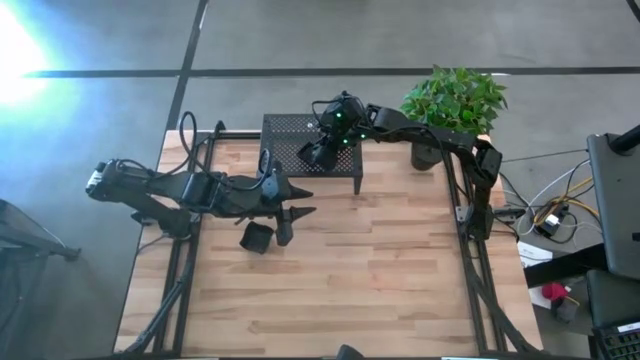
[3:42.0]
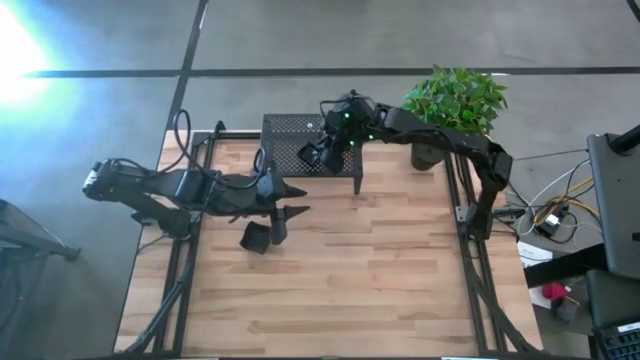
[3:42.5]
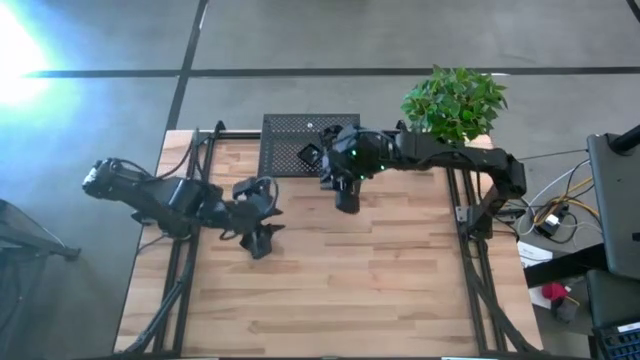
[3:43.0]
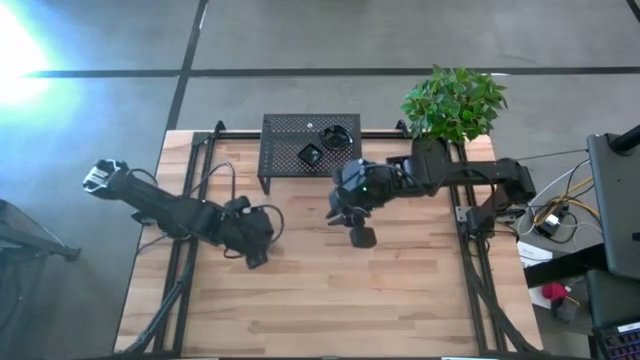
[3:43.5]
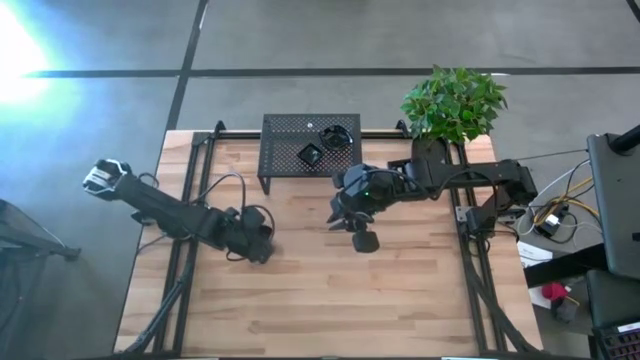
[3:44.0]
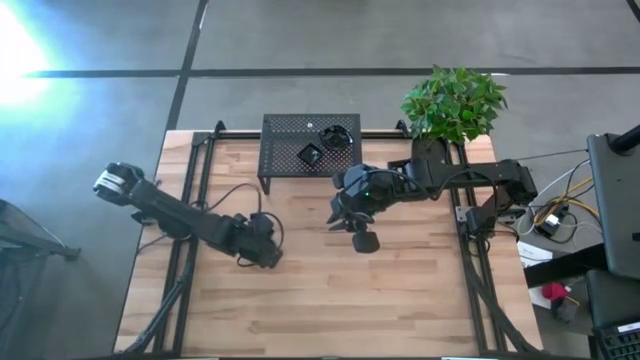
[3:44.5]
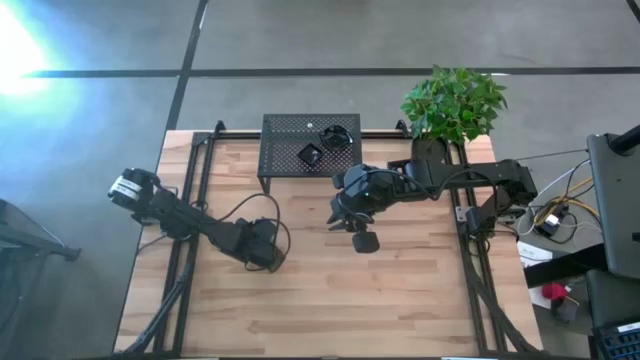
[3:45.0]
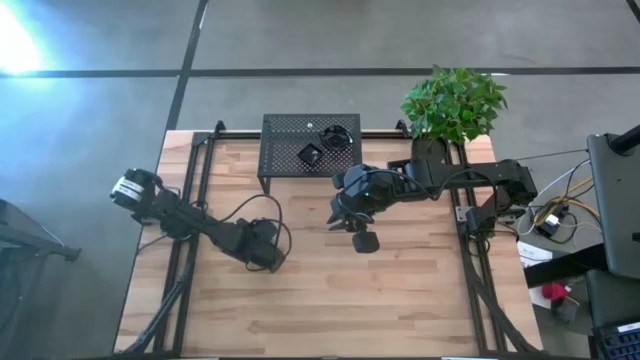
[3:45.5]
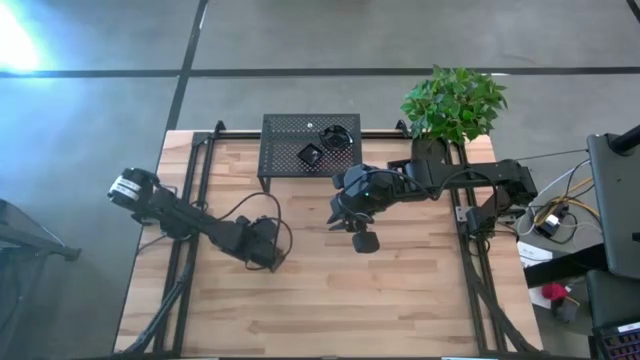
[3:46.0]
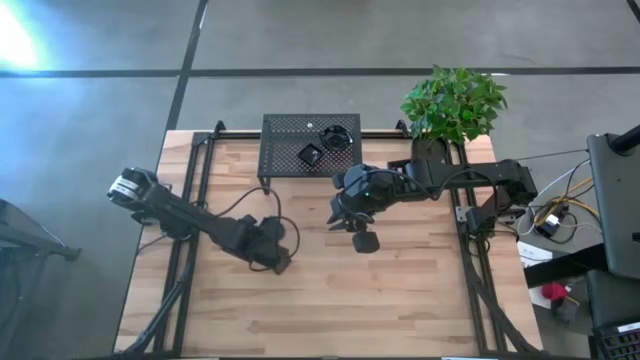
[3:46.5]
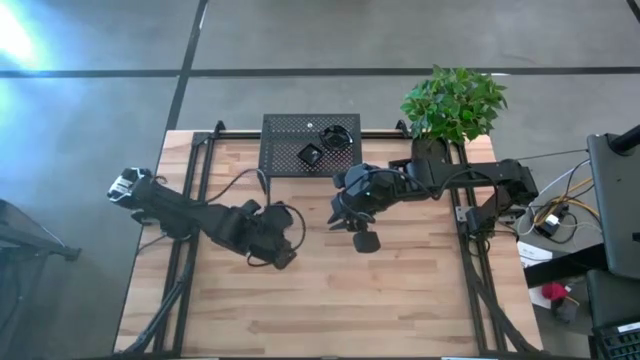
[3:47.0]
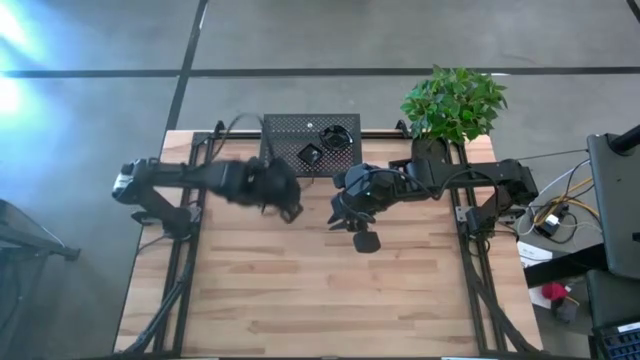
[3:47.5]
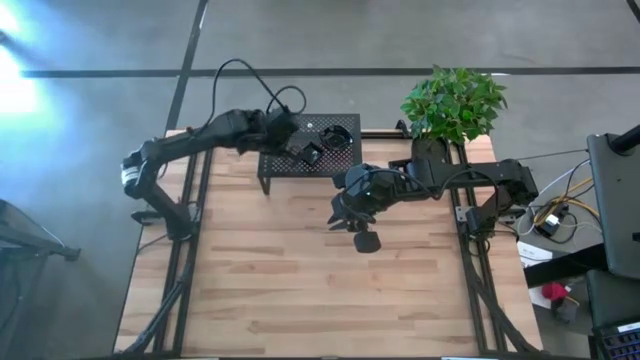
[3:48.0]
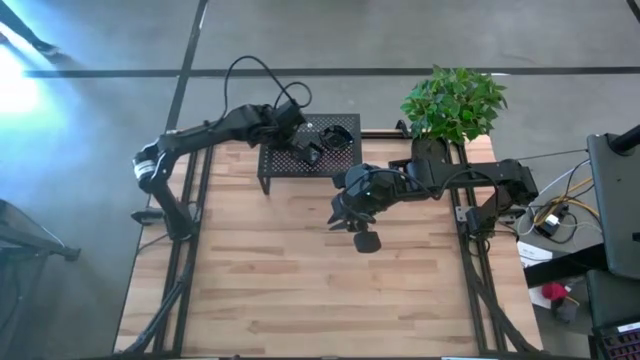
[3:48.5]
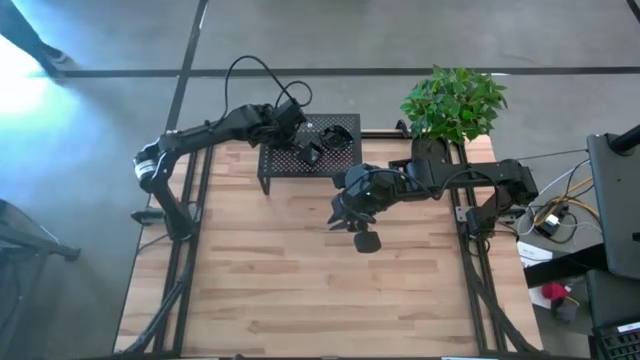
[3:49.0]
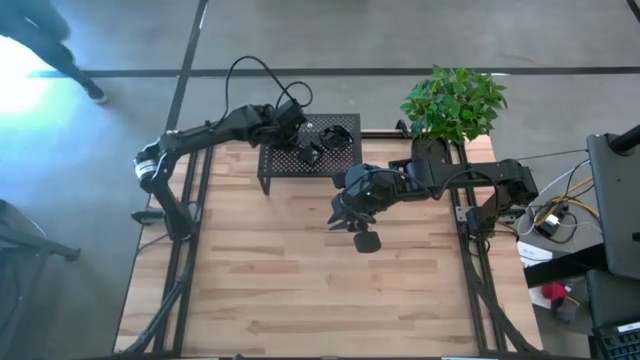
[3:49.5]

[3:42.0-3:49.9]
Task: Pick & Place Mini shaped plates
Put the stacked black distorted squared plates on the shelf

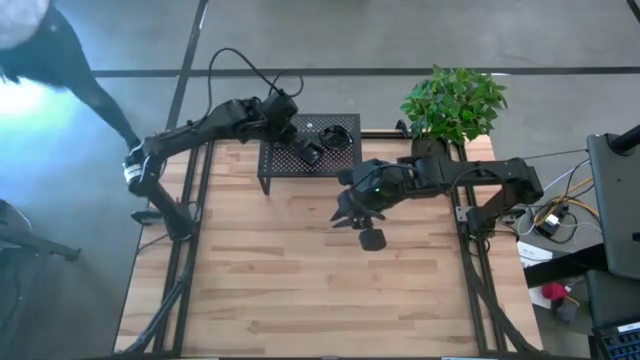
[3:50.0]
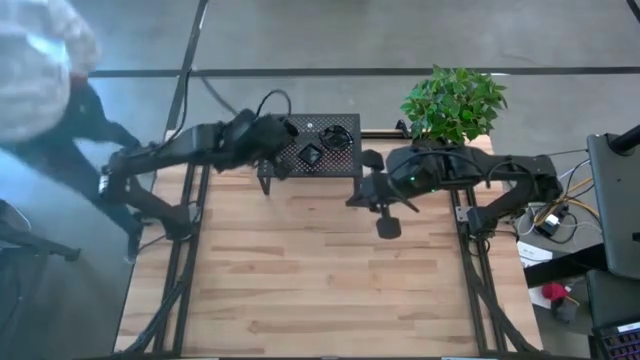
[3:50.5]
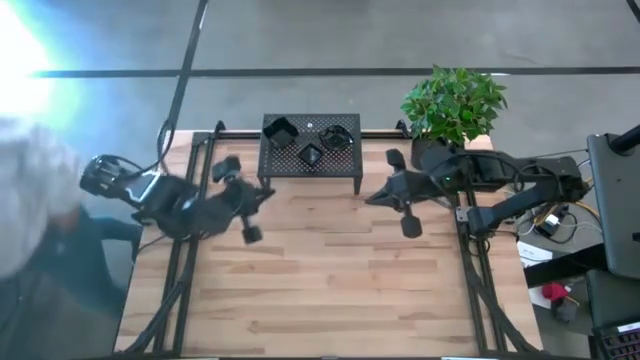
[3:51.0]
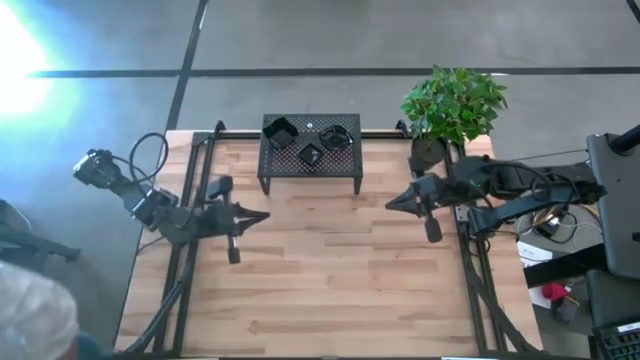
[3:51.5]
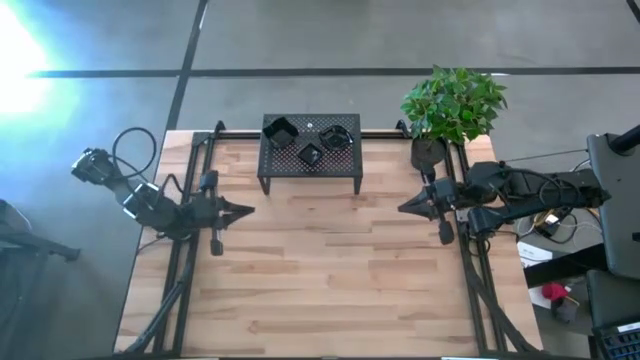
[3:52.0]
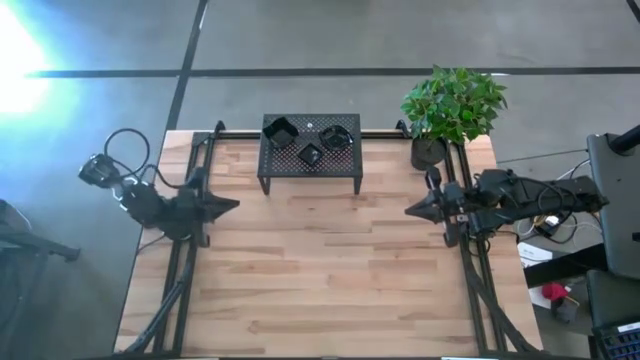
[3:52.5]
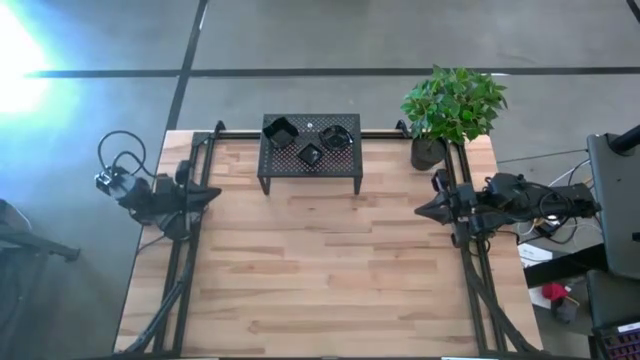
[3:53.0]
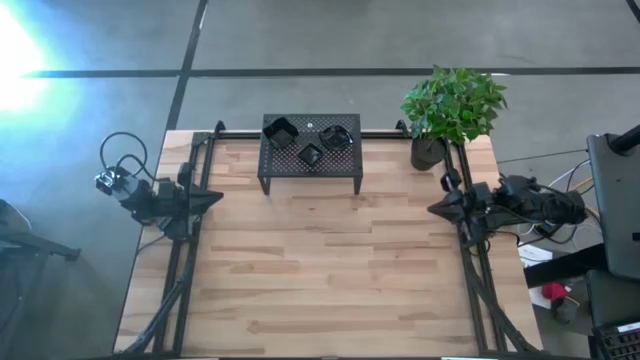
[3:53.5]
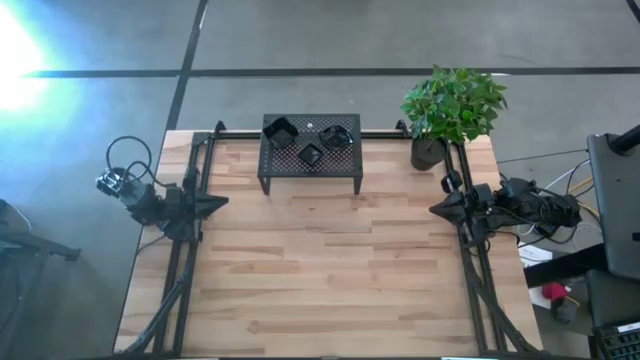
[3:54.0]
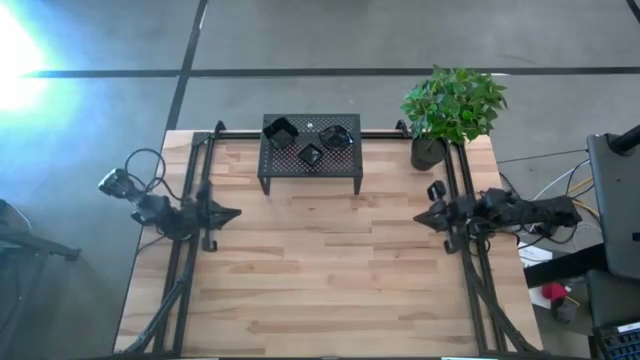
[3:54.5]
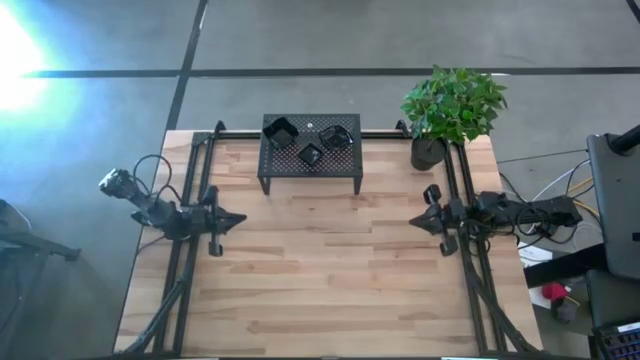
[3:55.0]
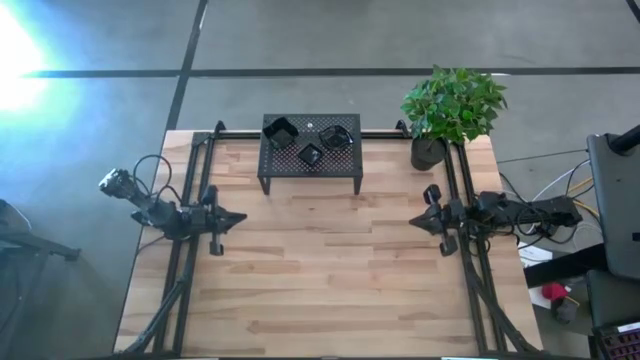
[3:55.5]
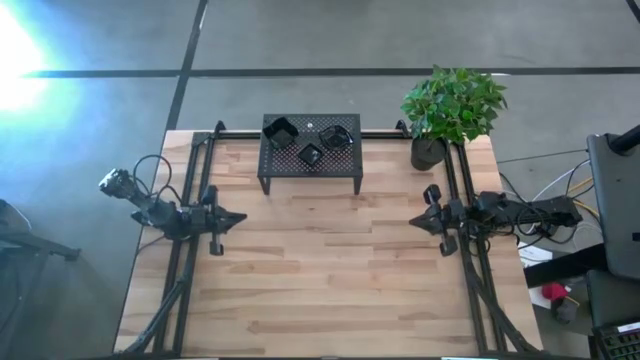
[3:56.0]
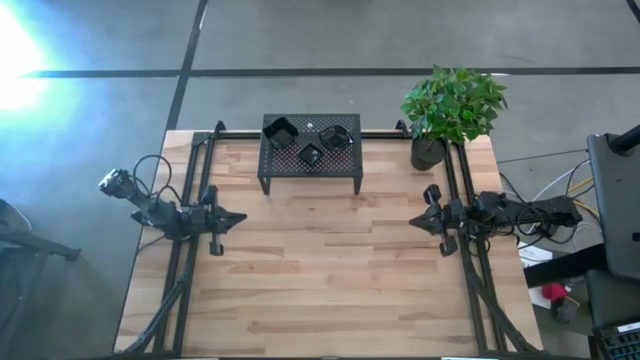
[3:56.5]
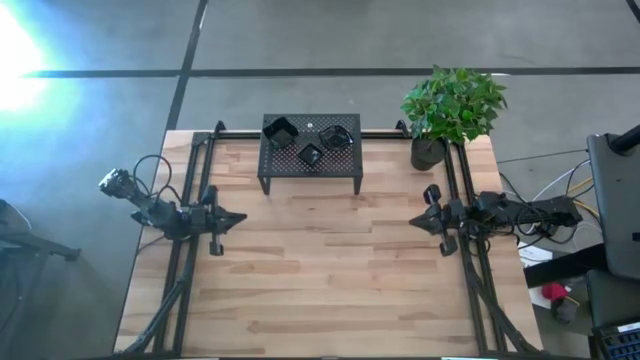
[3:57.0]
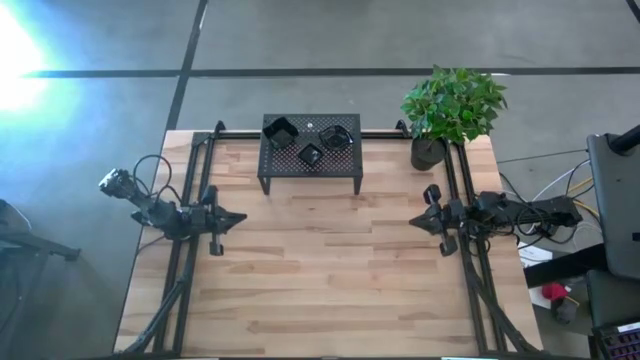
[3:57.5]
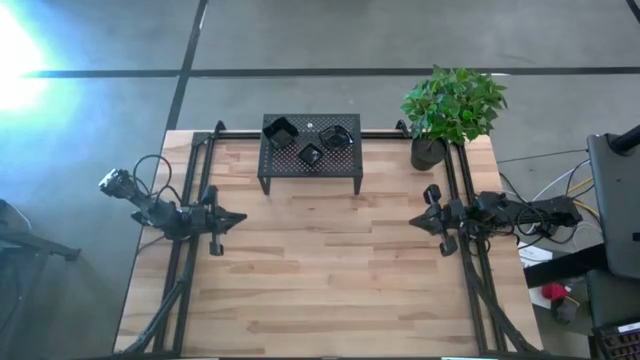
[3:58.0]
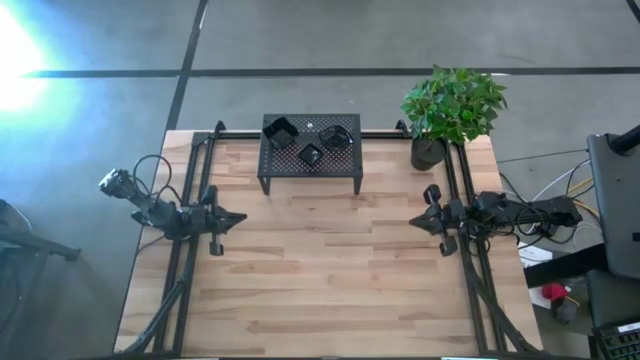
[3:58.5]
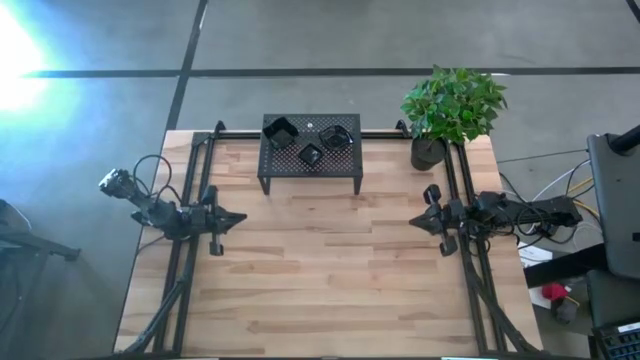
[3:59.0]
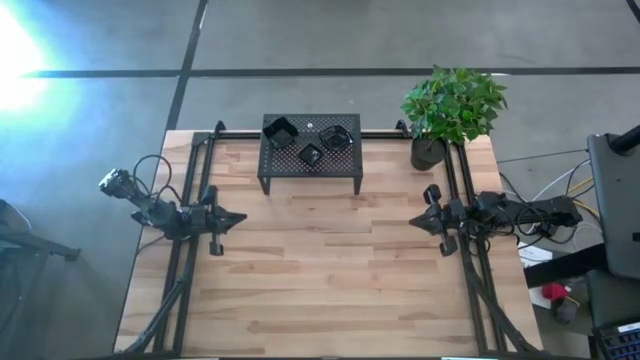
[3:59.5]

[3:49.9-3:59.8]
Return to Home Position

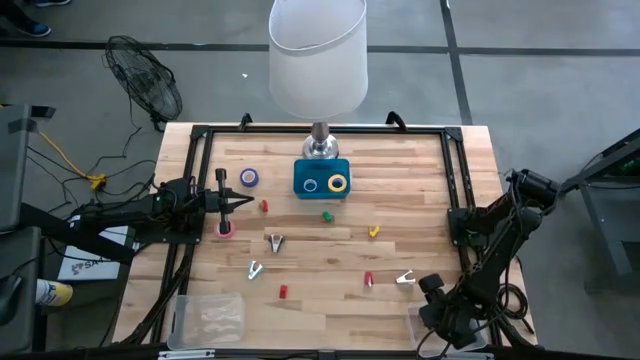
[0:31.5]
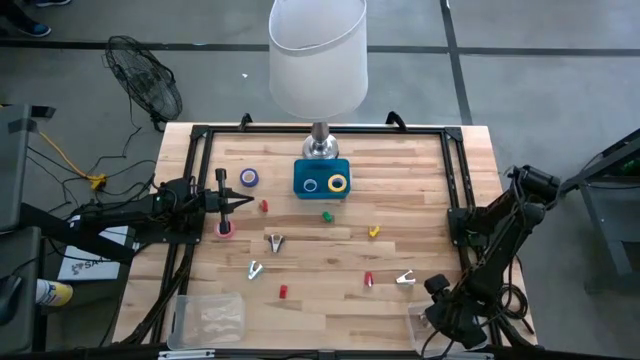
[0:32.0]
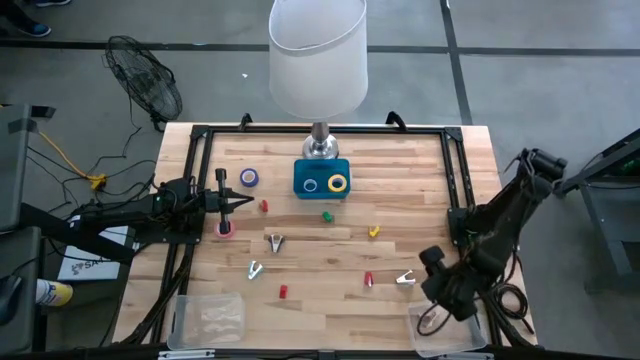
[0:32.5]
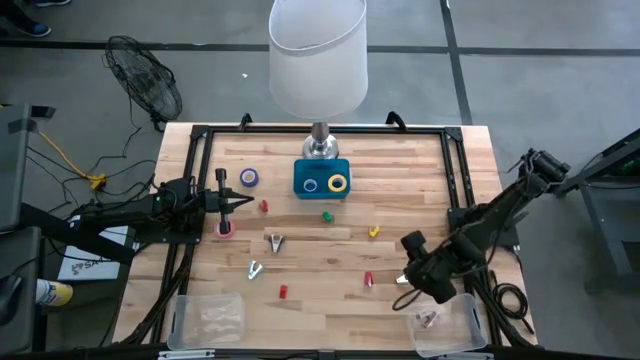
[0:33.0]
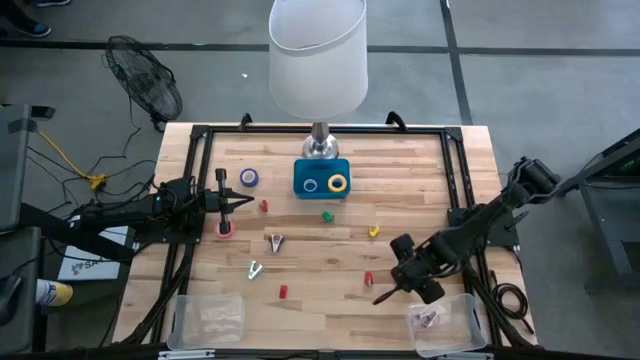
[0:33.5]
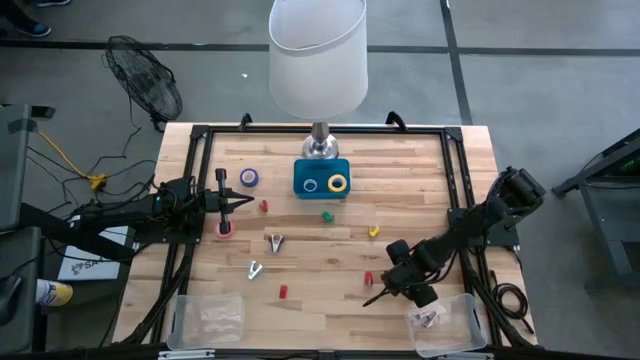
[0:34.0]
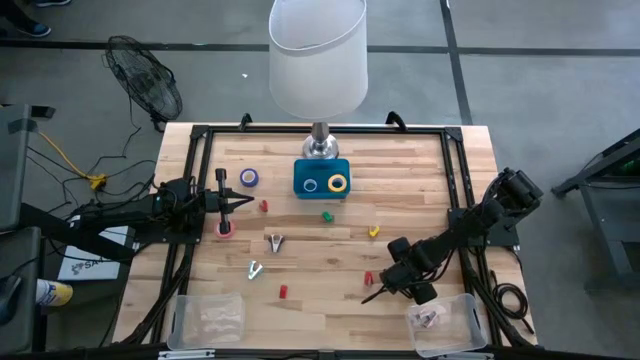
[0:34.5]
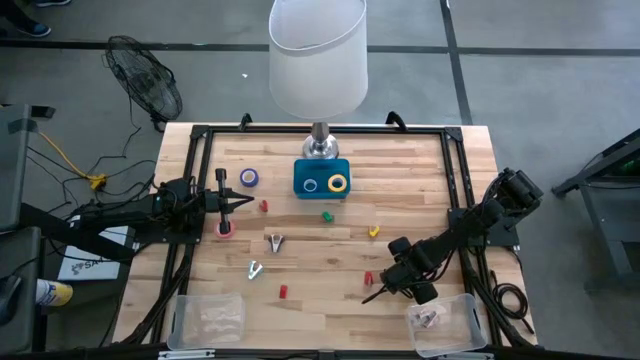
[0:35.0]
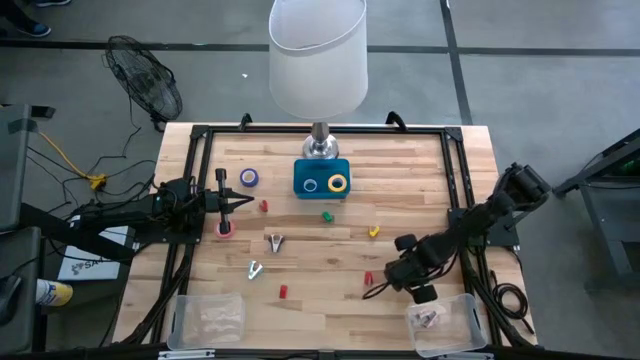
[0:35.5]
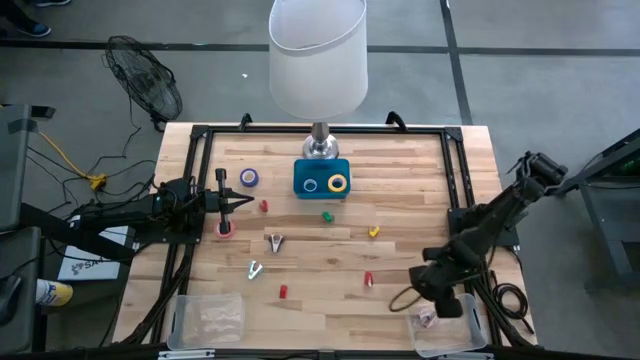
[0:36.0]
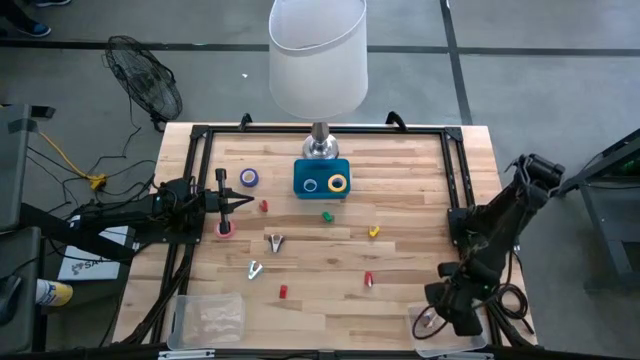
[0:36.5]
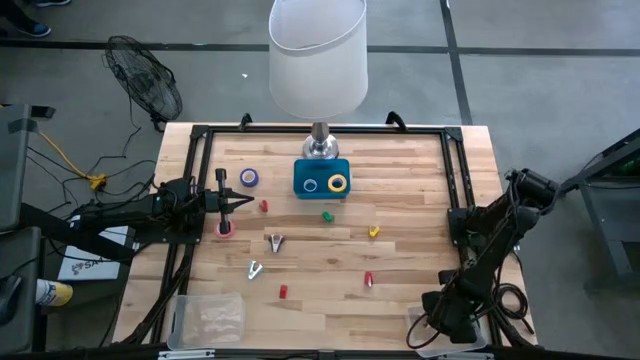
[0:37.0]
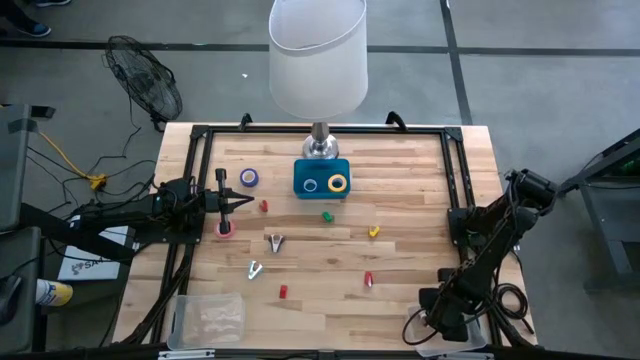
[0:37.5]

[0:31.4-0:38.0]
Task: Pick and place Stapler, Stapler remover, tape
Put the gray staple remover into the right transparent bin
